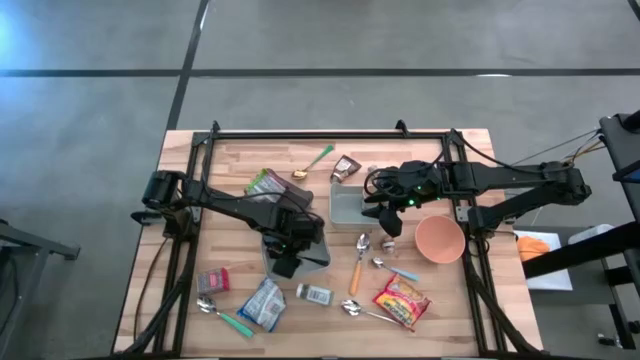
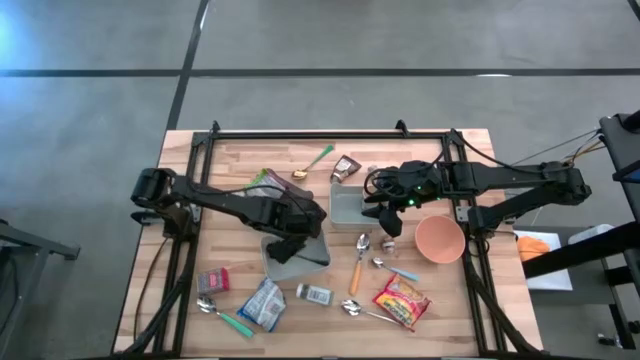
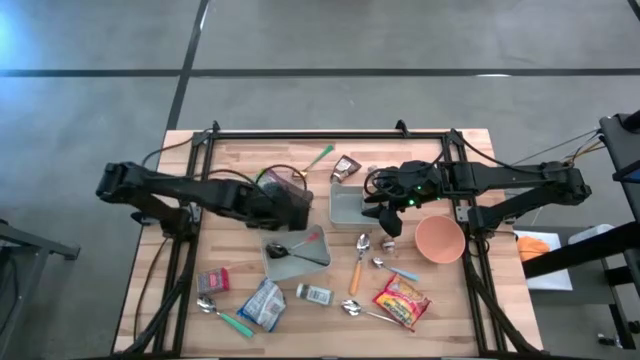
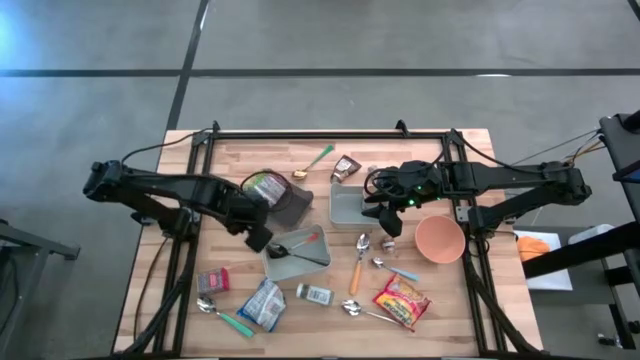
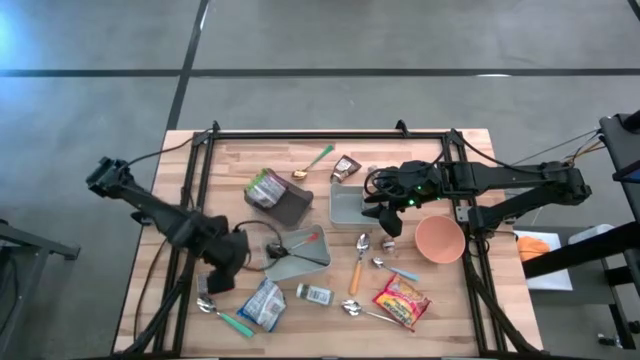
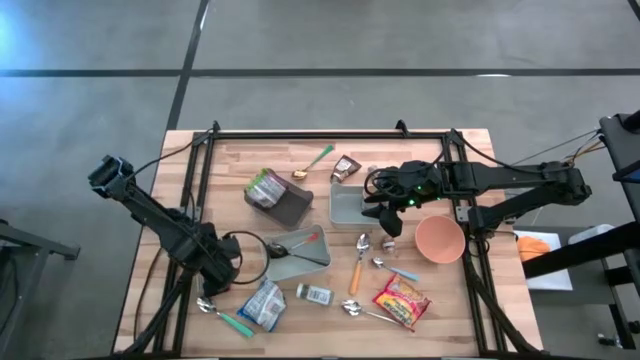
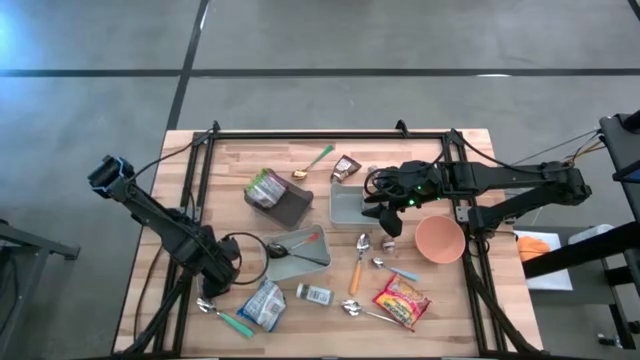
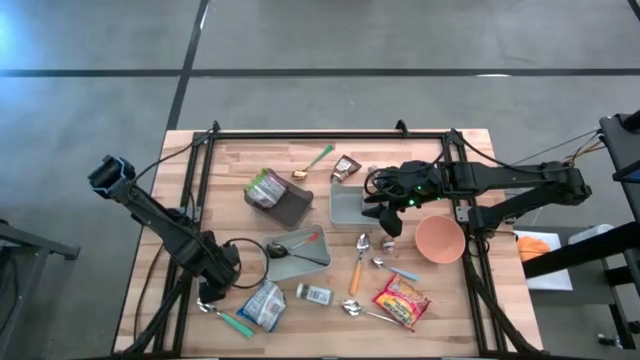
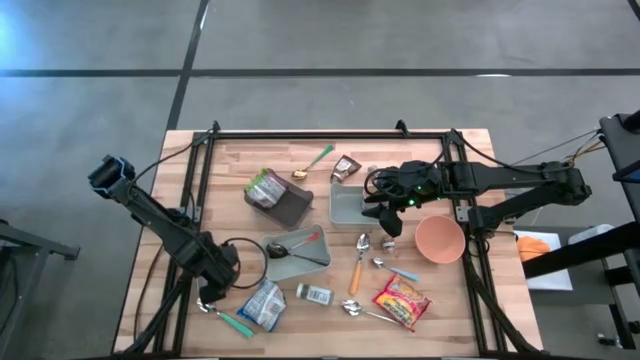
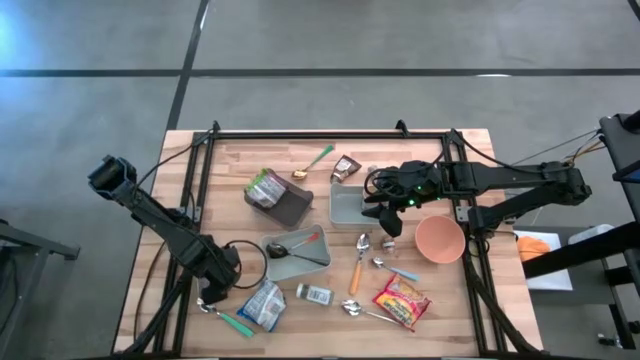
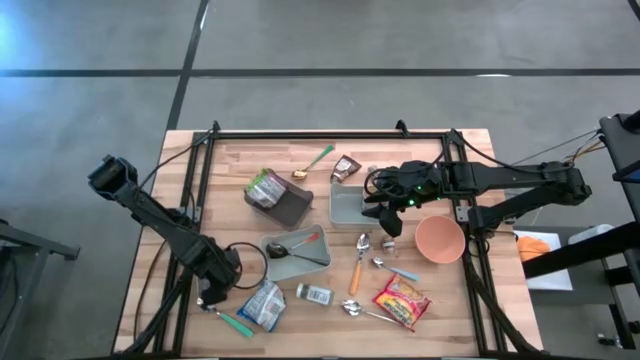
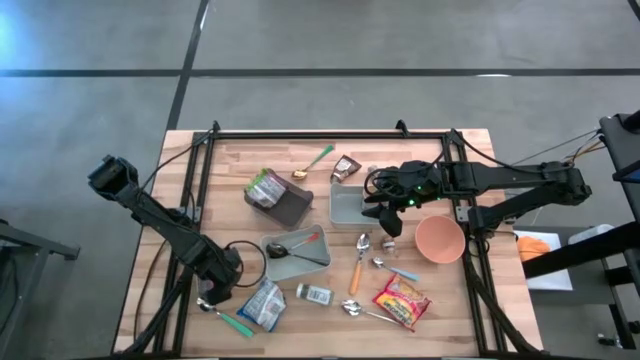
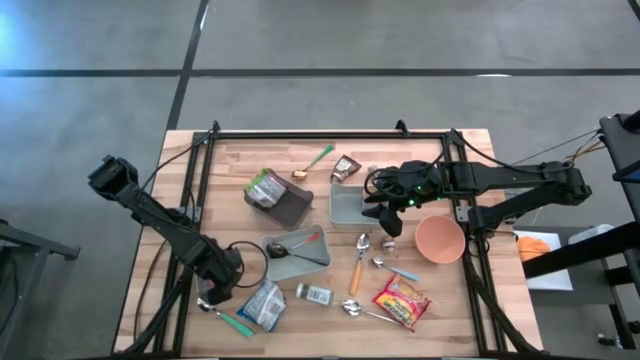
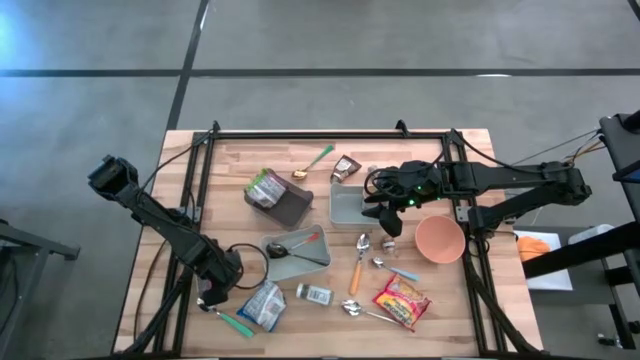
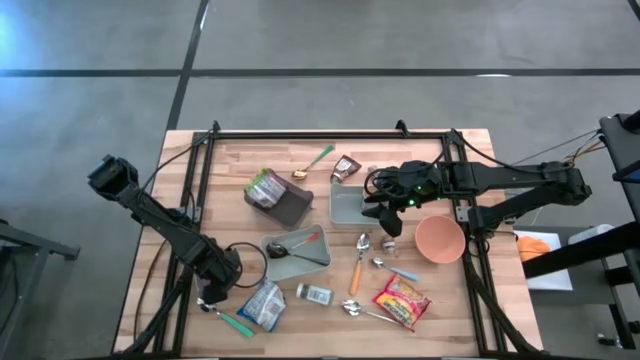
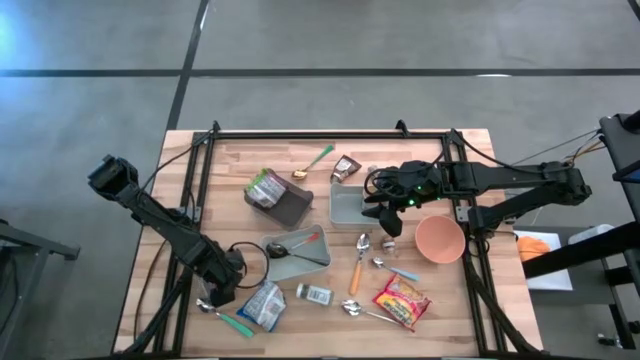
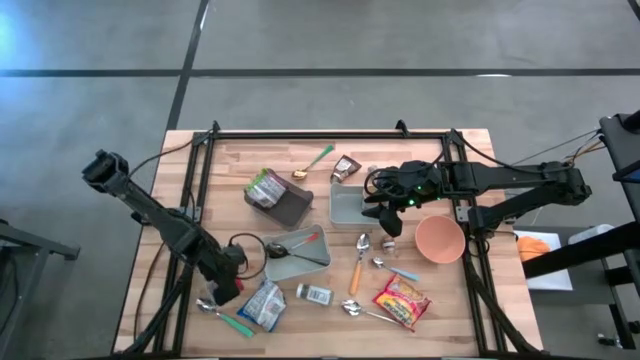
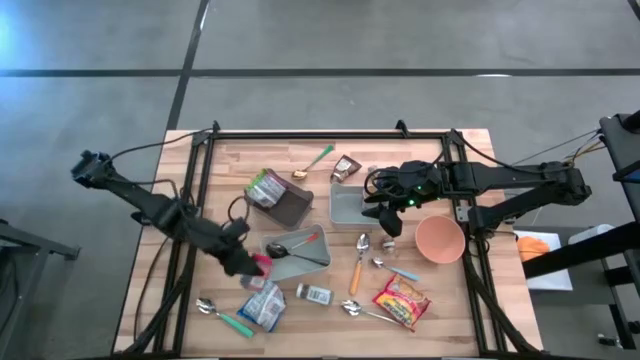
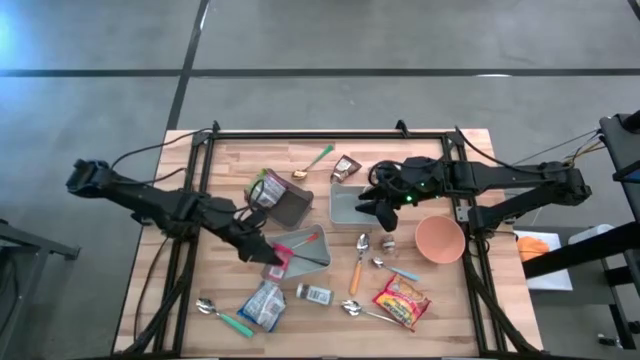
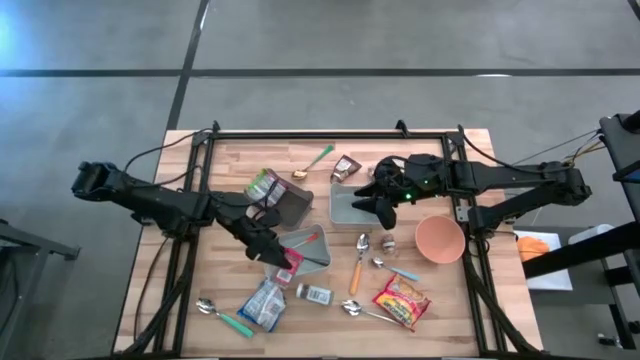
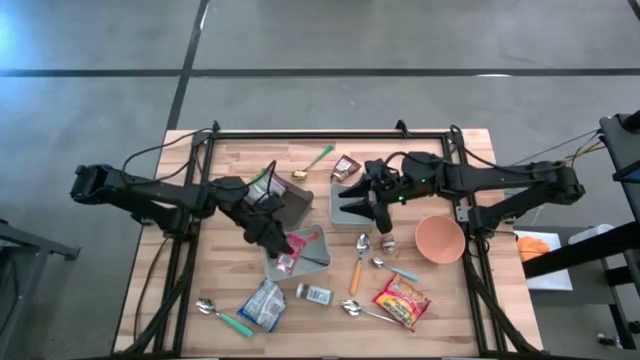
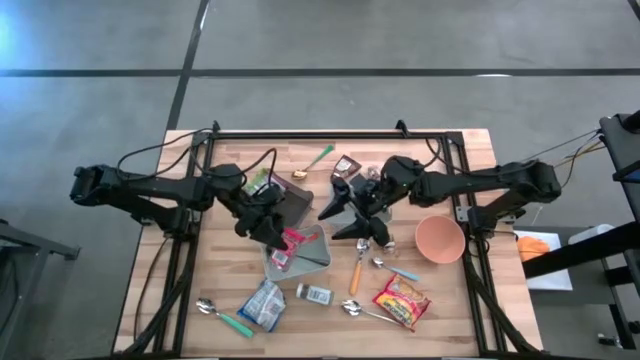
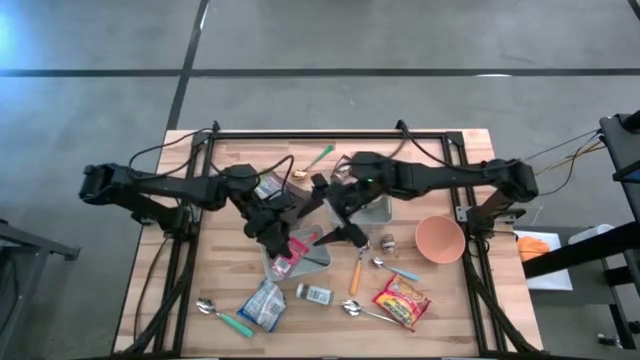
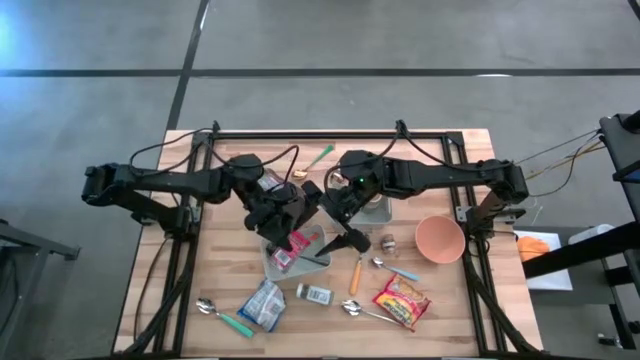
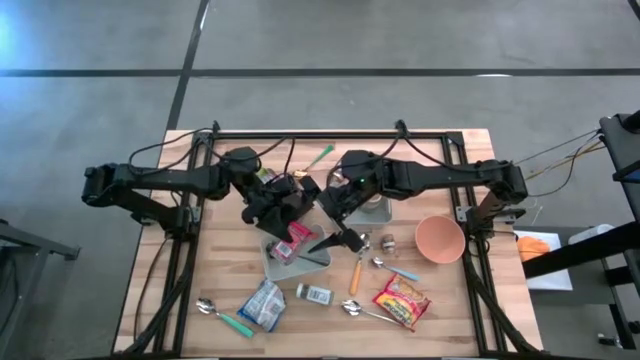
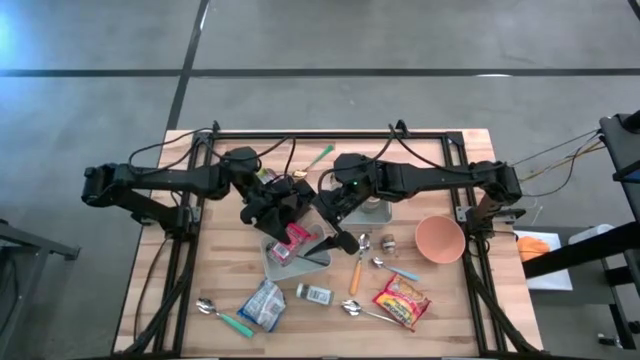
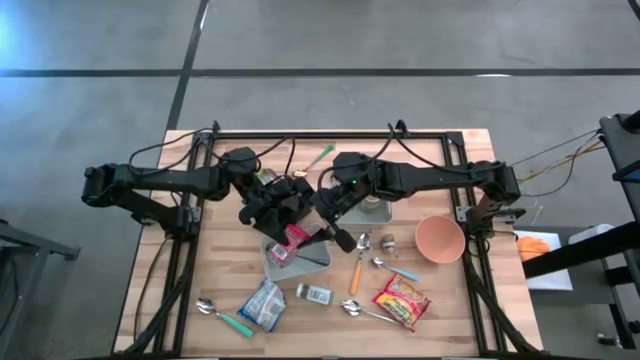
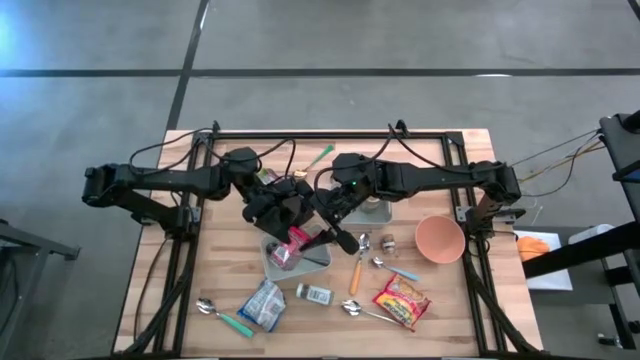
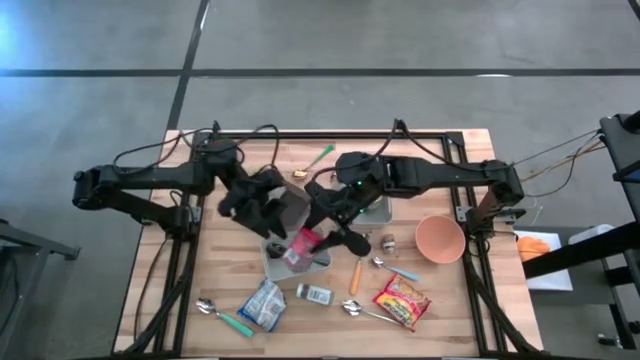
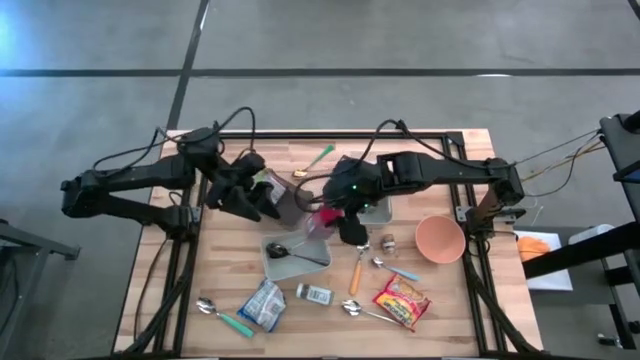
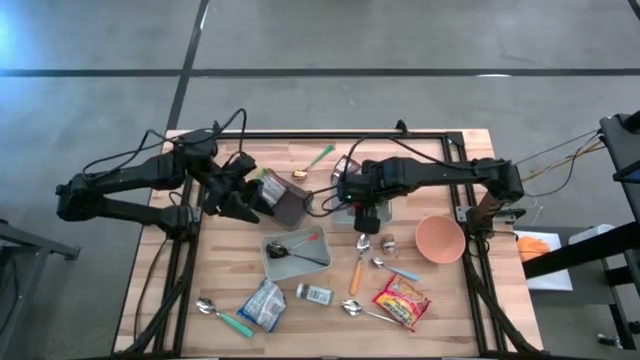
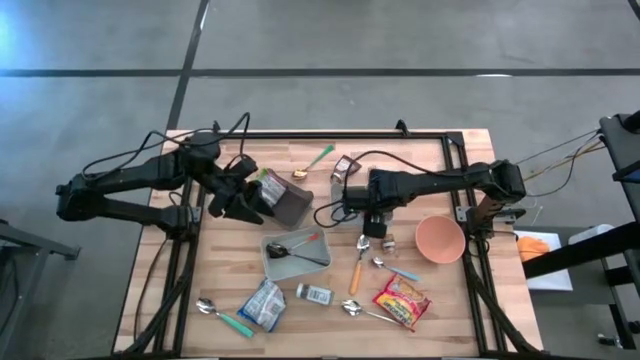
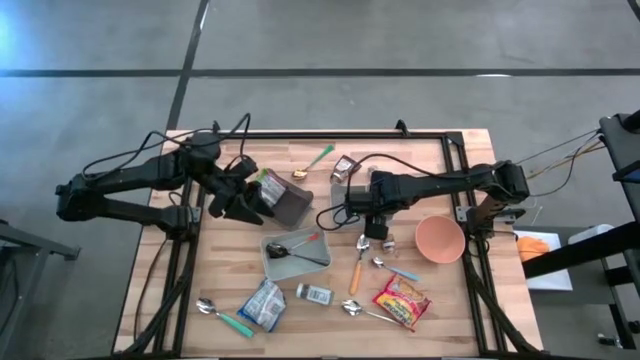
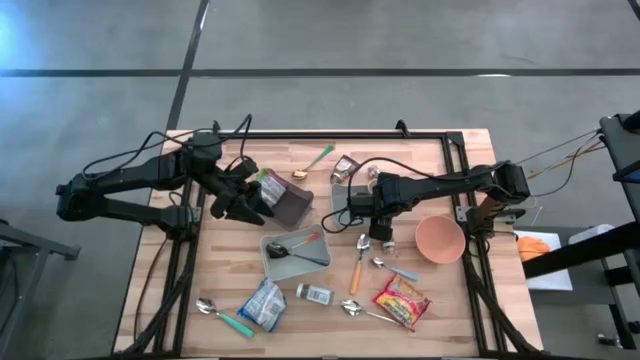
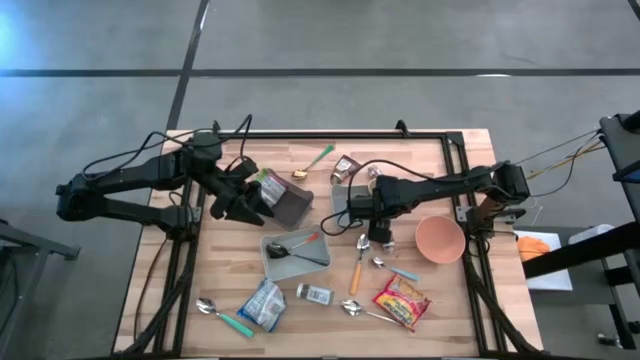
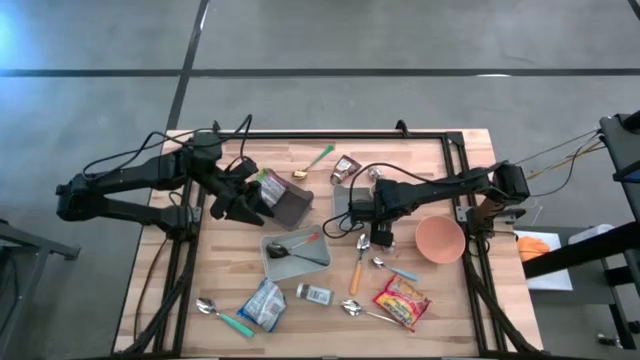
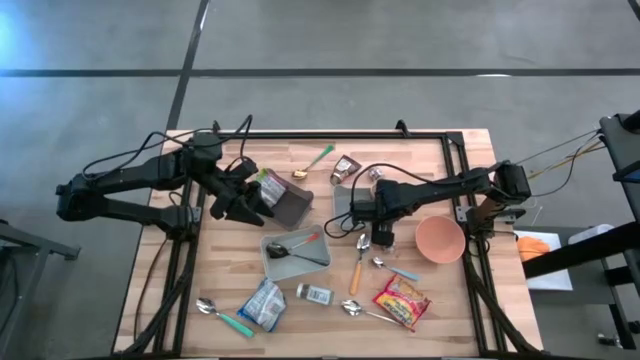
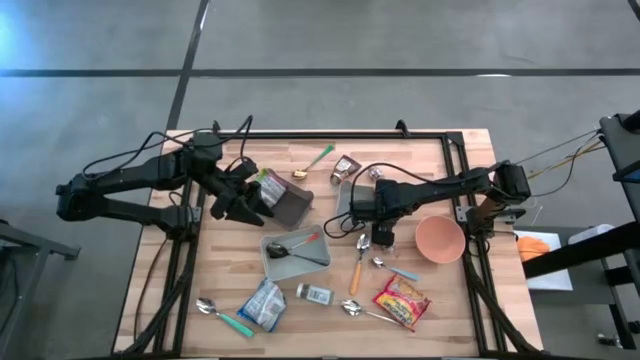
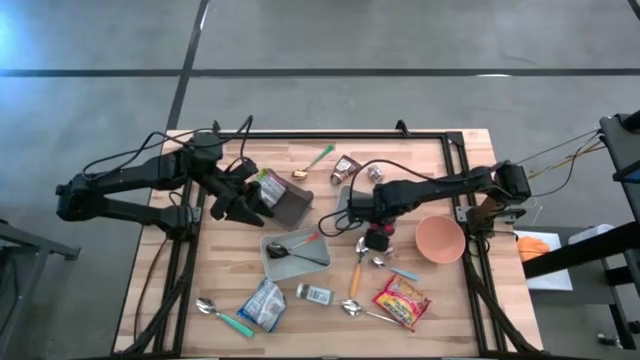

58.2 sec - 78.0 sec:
Put the red seasoning can into the top gray bin
